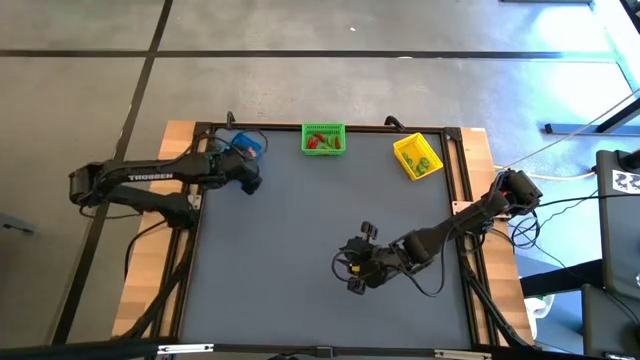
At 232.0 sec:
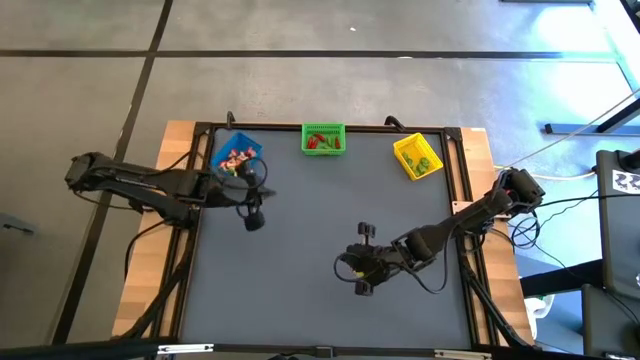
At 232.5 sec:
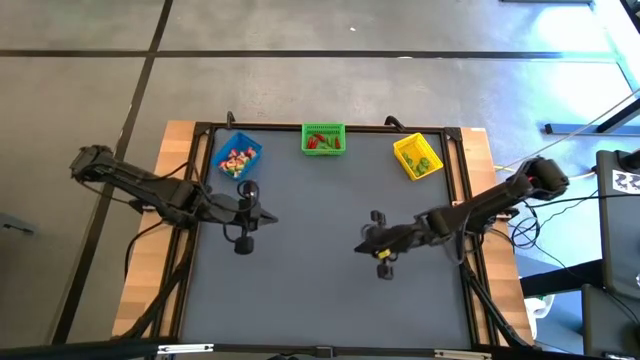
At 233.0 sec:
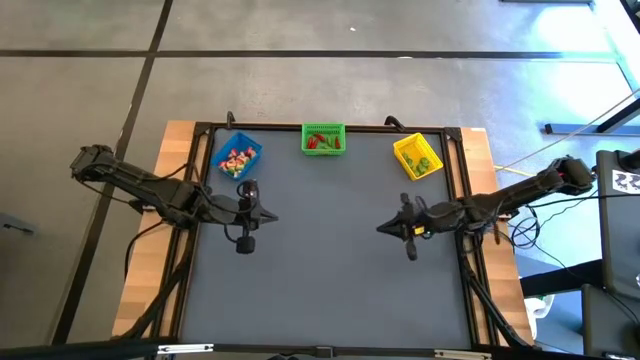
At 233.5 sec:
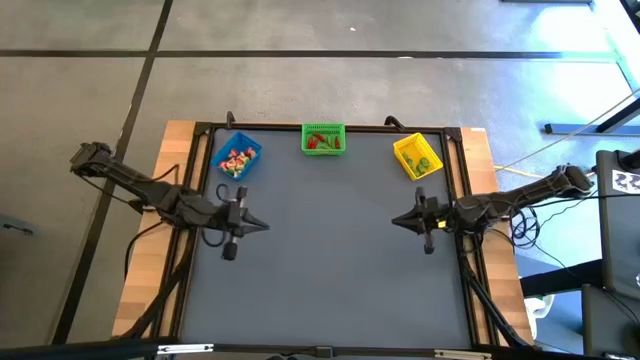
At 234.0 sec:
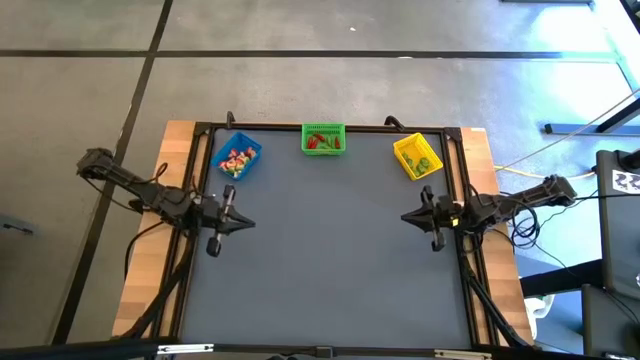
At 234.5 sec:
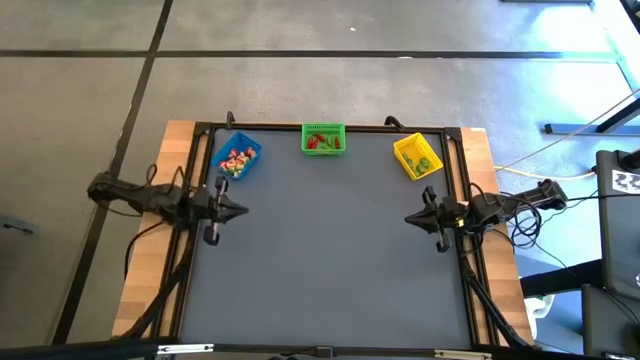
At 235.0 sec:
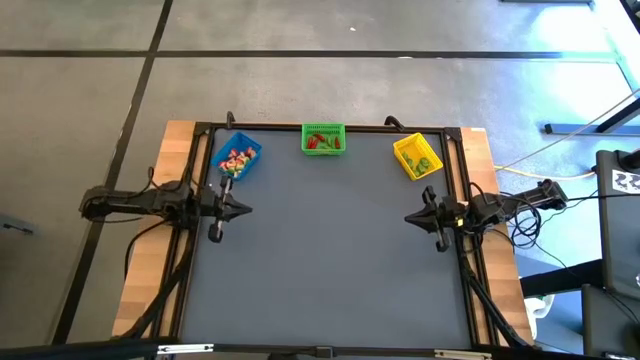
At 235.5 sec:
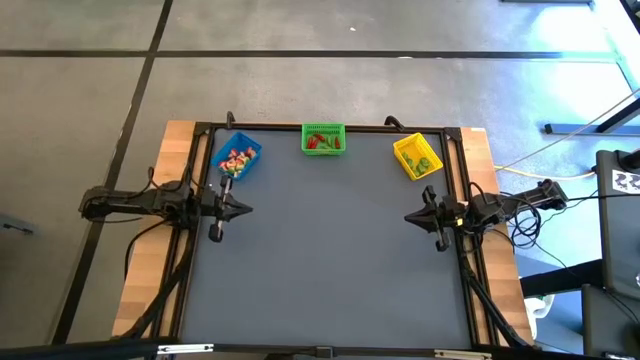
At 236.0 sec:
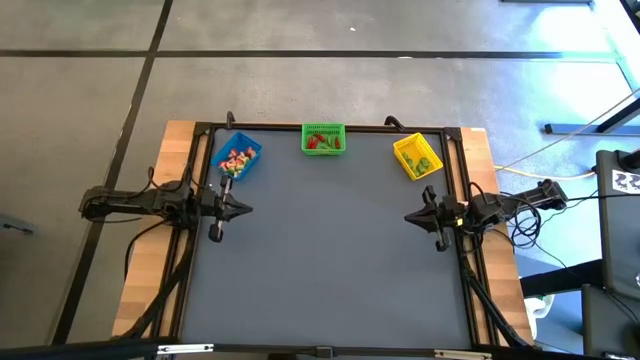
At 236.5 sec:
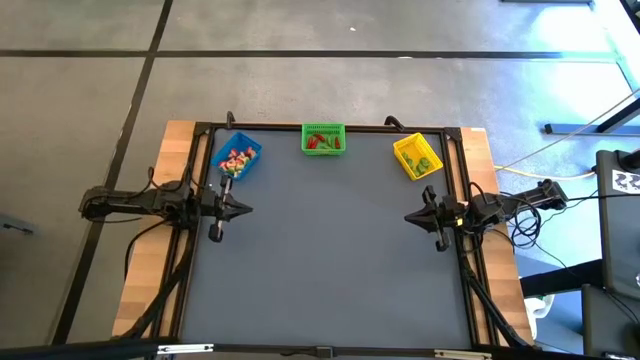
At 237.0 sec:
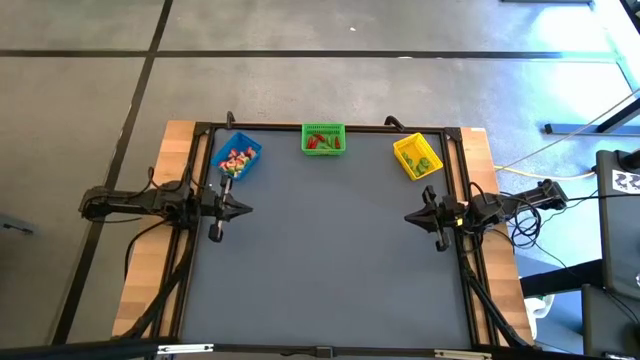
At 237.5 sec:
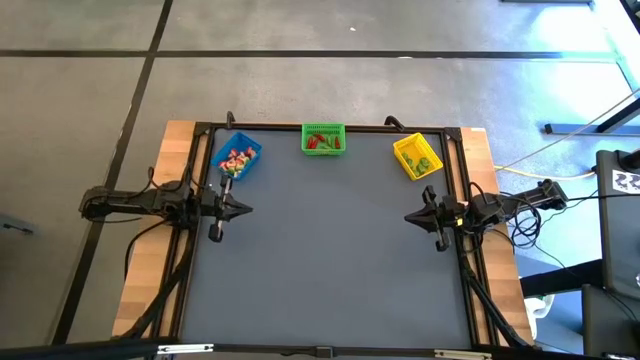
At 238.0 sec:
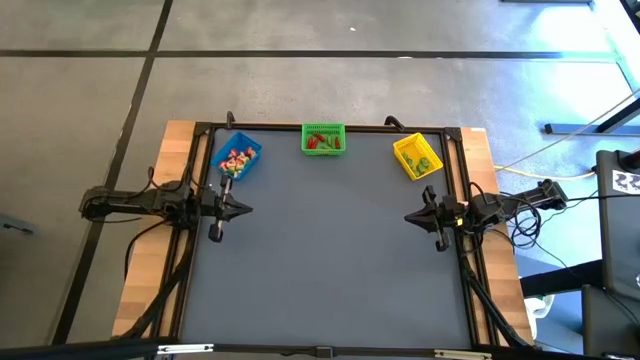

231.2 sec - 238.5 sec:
Task: Sort produce into baskets
Return to Home Position

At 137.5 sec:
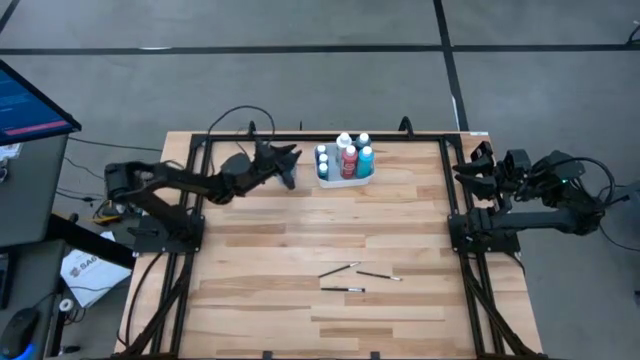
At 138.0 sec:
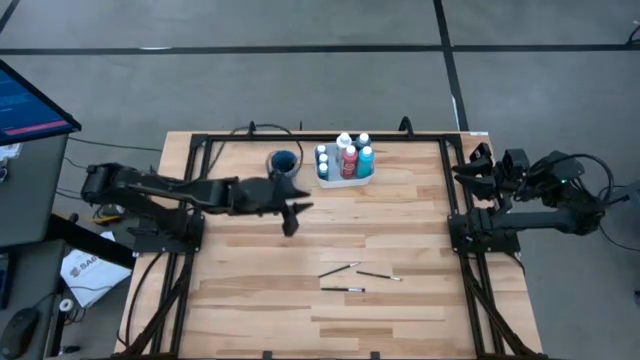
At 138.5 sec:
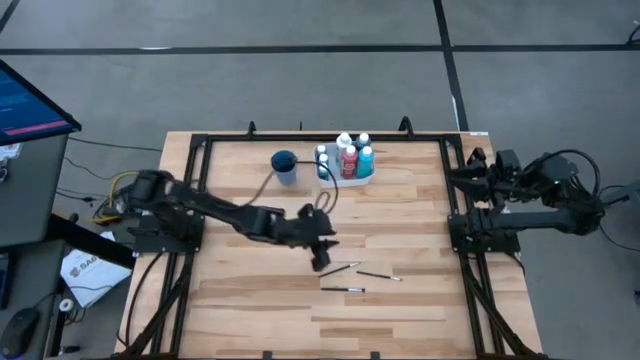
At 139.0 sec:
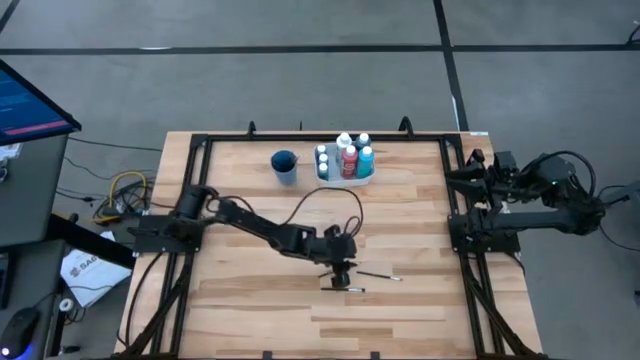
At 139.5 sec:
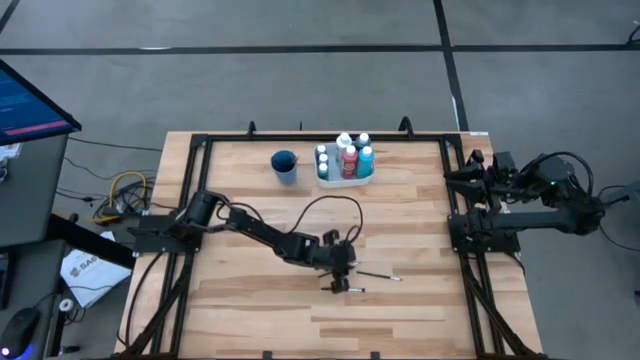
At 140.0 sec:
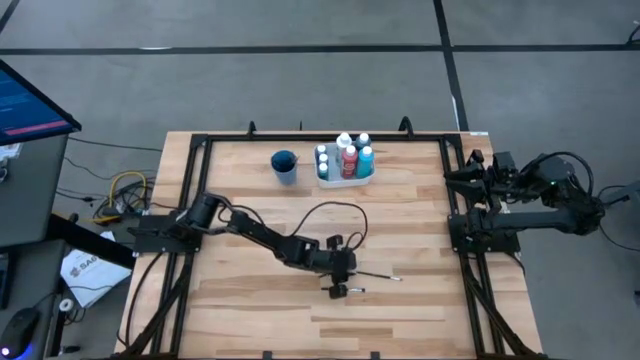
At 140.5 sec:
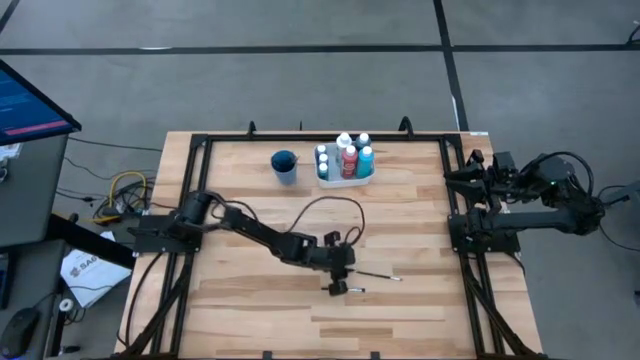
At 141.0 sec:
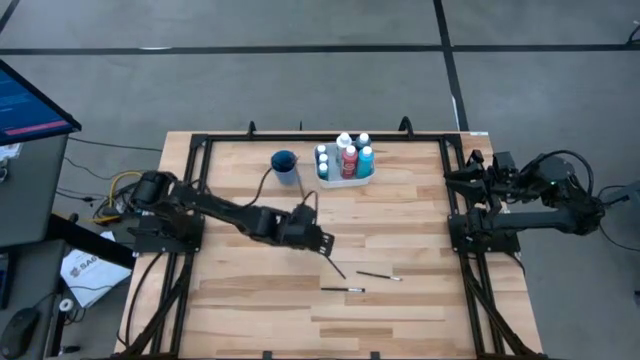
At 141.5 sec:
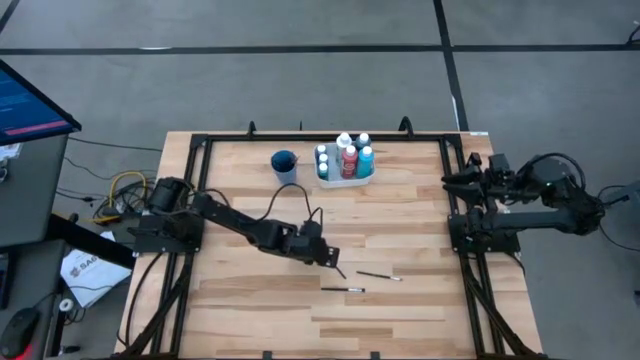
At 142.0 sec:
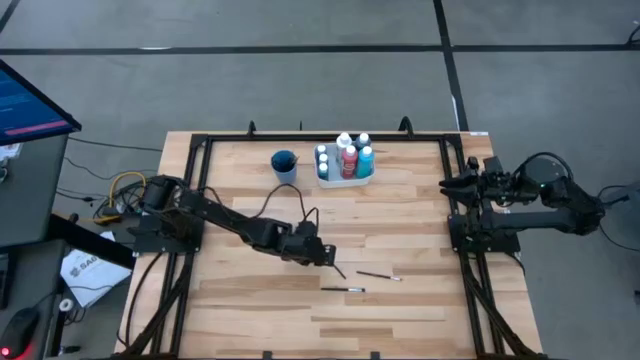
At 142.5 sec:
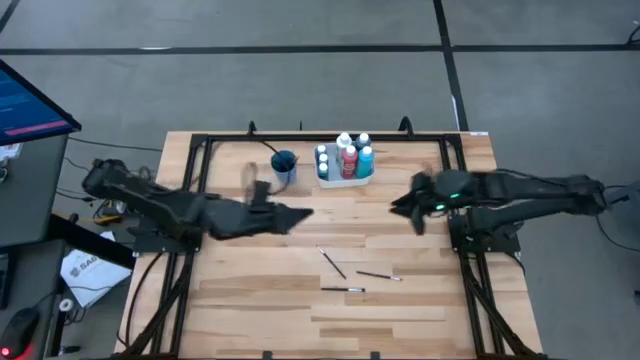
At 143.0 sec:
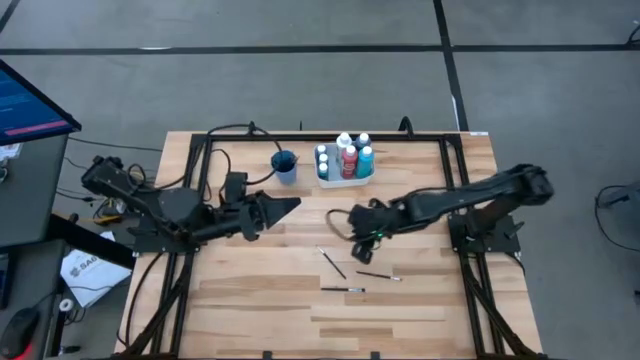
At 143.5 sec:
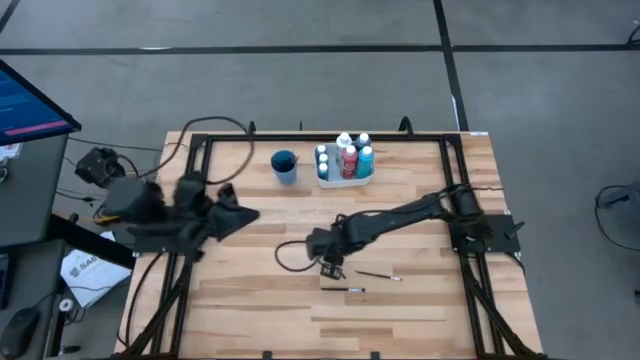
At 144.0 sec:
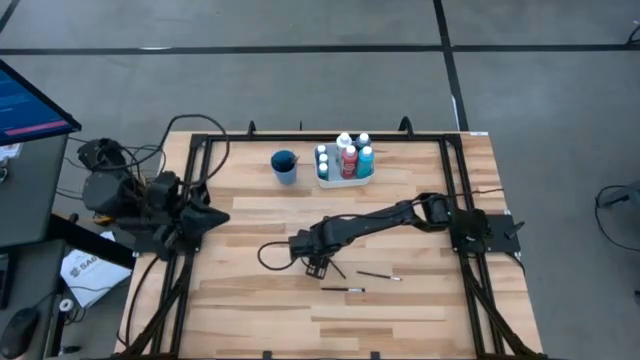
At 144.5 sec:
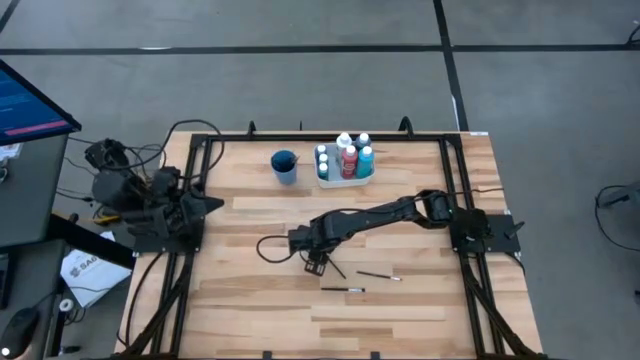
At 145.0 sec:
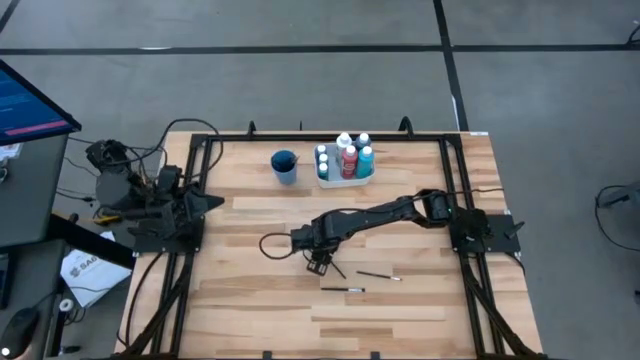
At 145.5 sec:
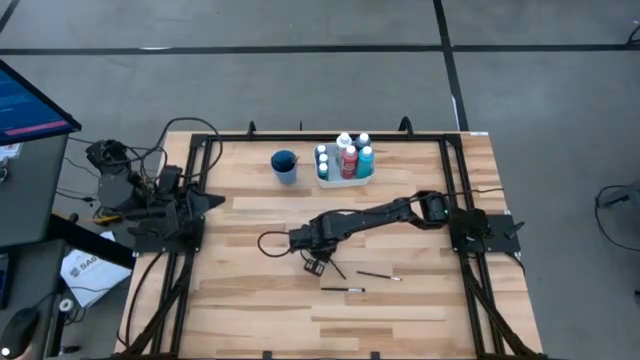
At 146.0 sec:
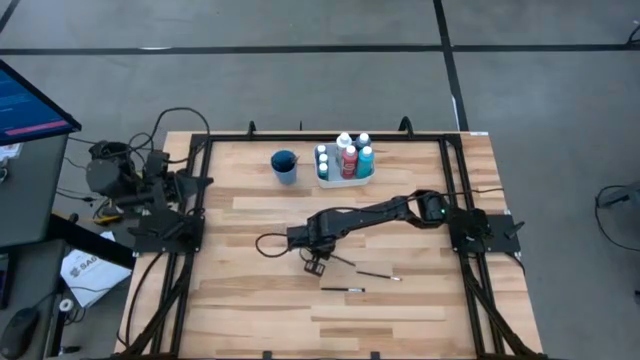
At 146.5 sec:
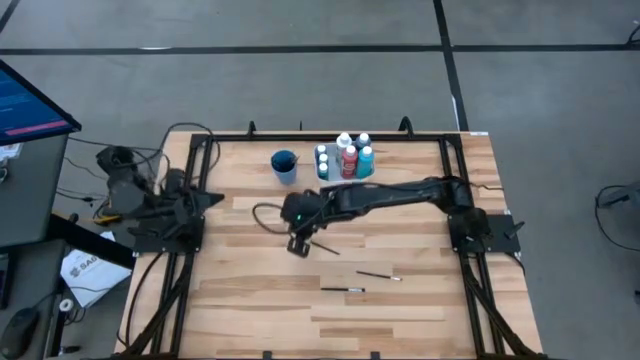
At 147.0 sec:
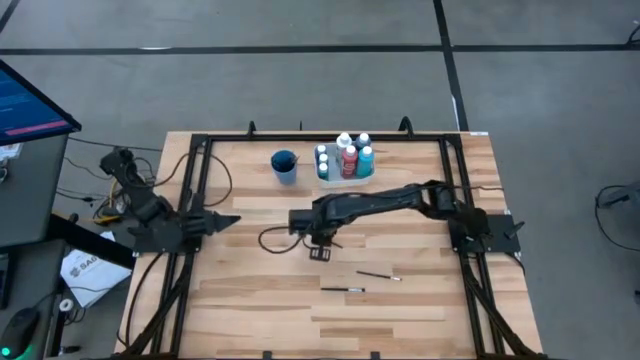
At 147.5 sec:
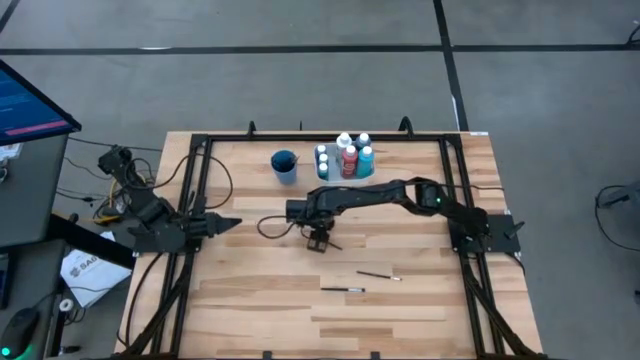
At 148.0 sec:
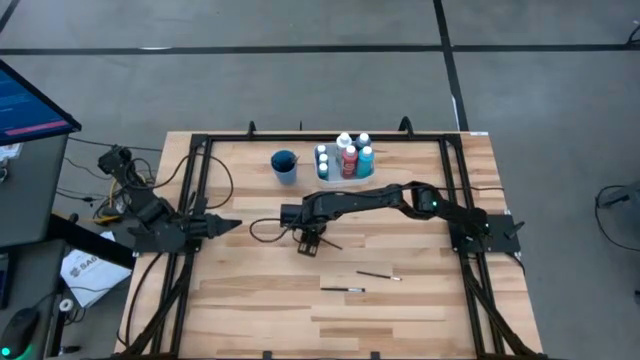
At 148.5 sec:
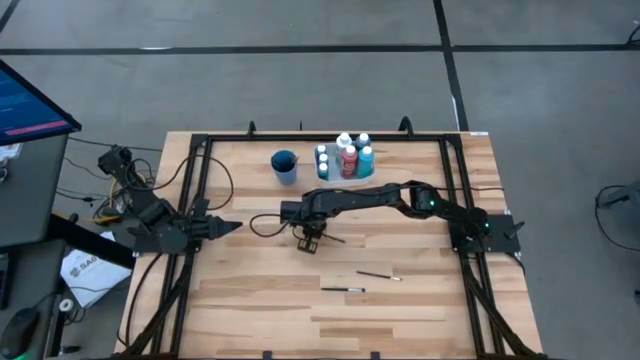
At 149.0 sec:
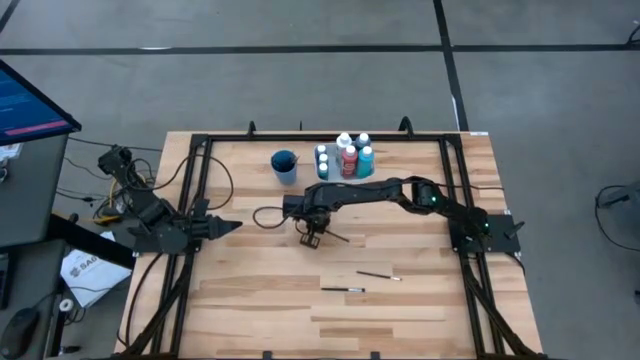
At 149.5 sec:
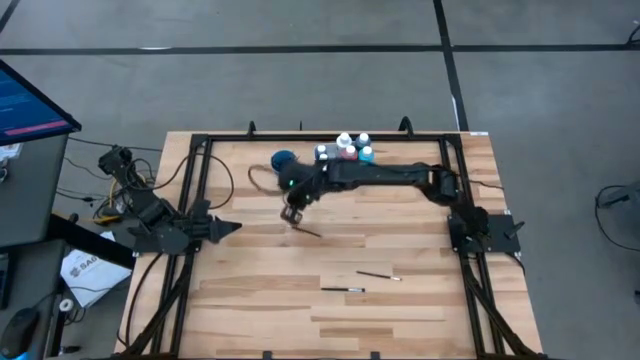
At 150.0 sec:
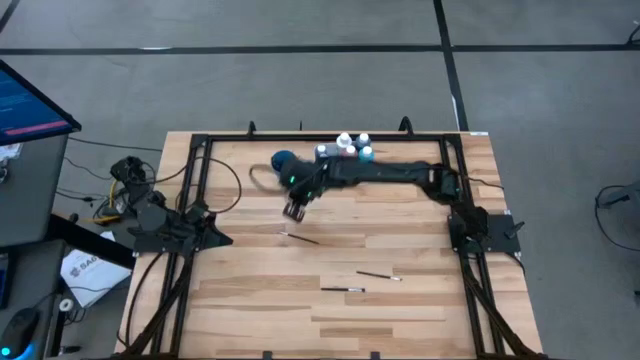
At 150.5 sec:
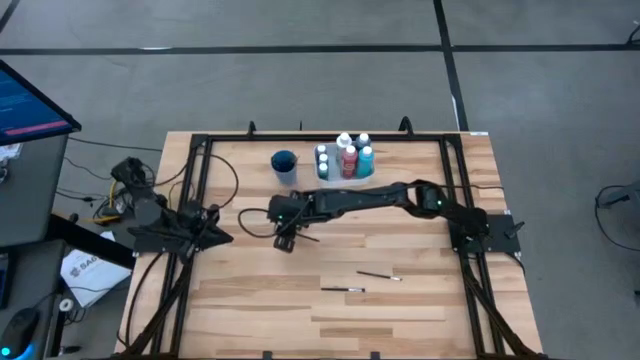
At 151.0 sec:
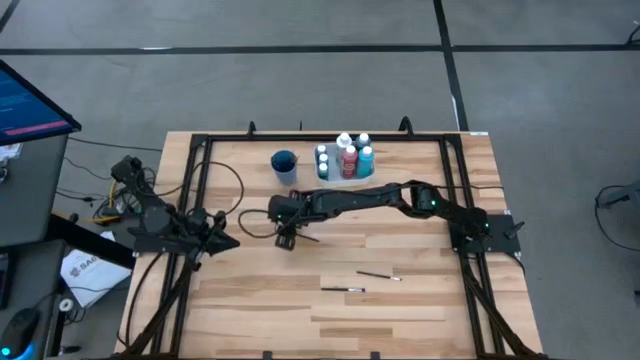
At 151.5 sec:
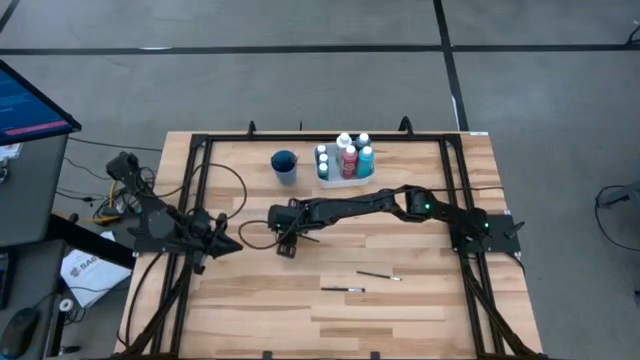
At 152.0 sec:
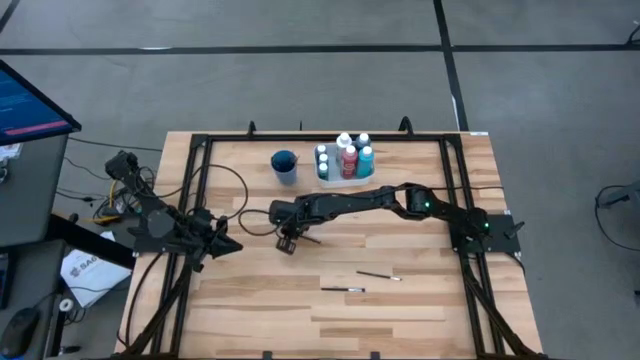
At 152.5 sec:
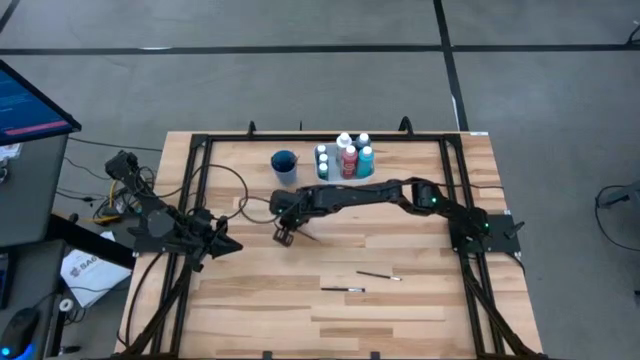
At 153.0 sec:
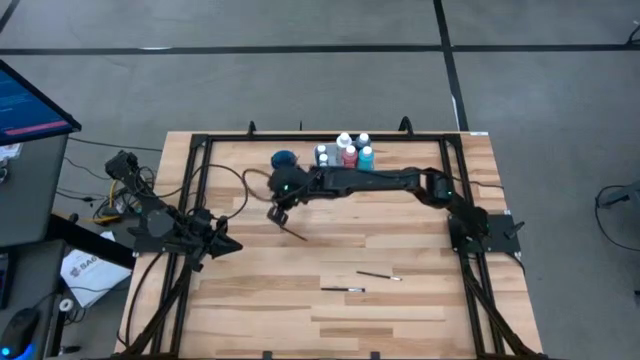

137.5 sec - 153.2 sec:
Task: Pick & Place Paint Supplies
Put the silver and black paint brush into the blue cup
